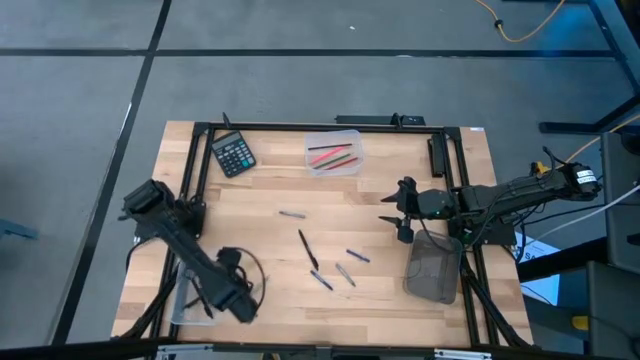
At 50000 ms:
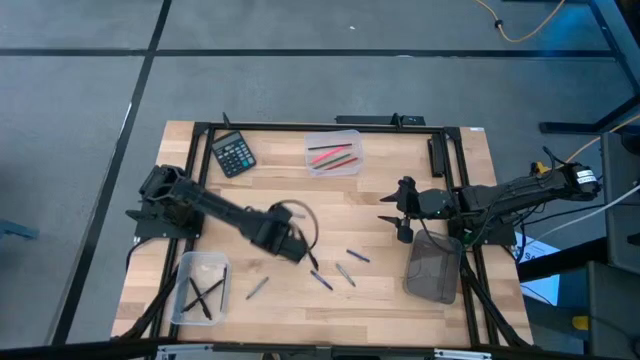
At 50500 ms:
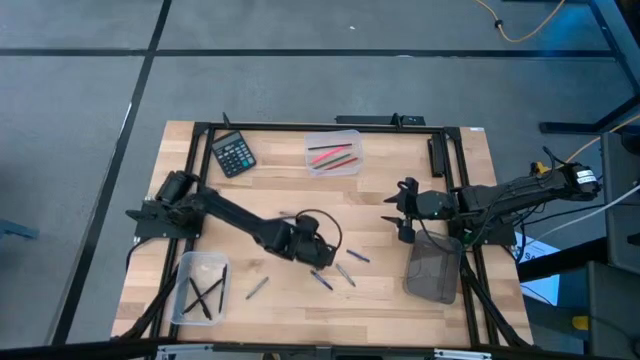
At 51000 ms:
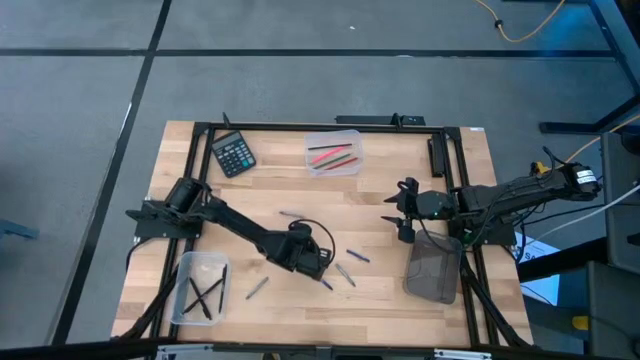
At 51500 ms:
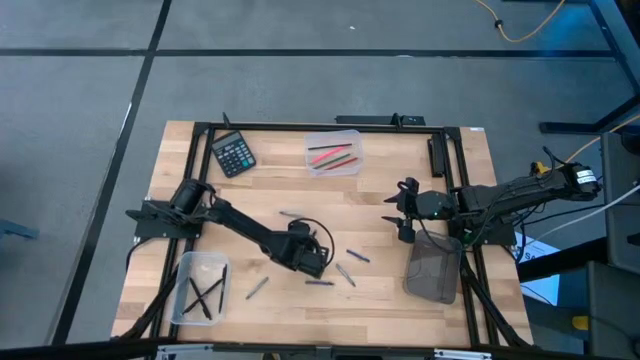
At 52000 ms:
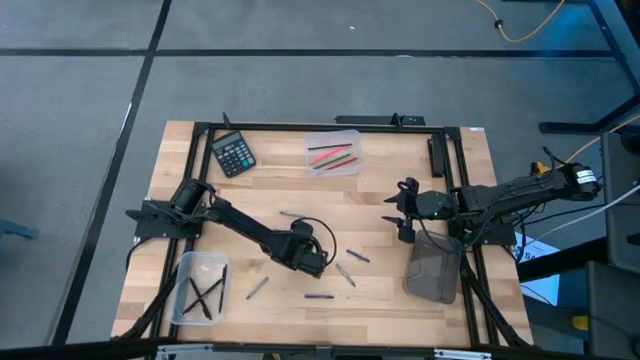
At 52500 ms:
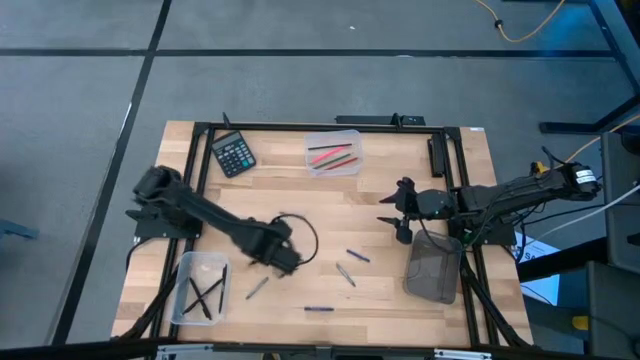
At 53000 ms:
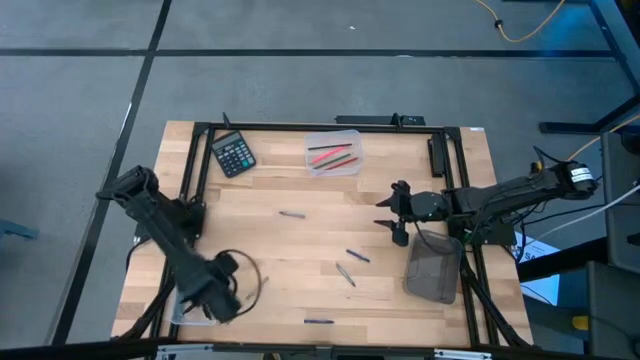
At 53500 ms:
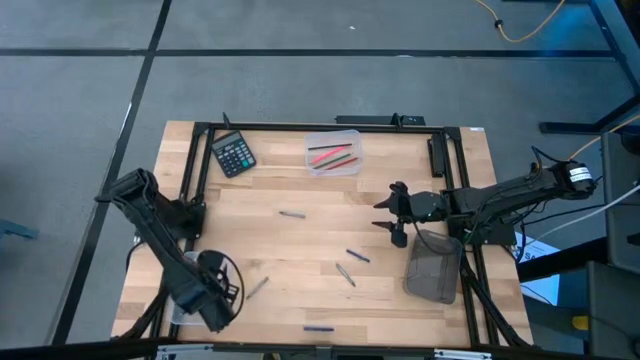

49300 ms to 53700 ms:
Task: Sort crayons/erasers/pens/pencils in bins
Put the black pen into the bottom transparent bin

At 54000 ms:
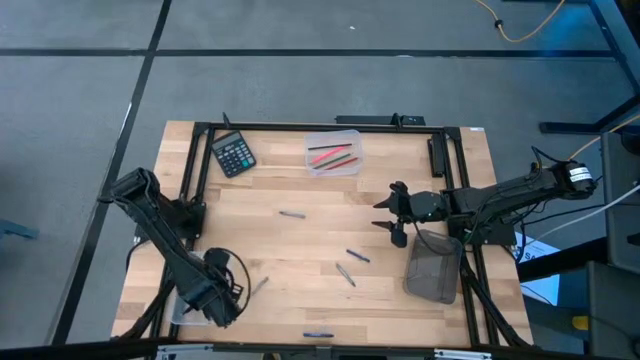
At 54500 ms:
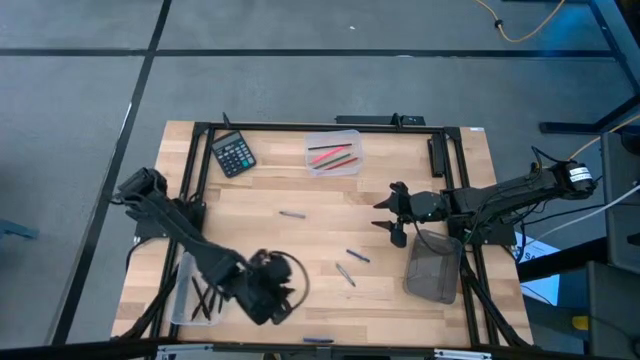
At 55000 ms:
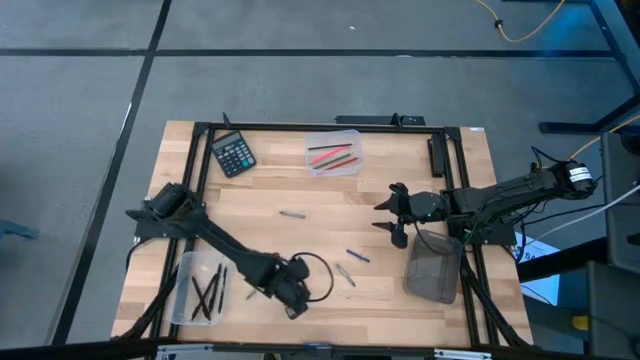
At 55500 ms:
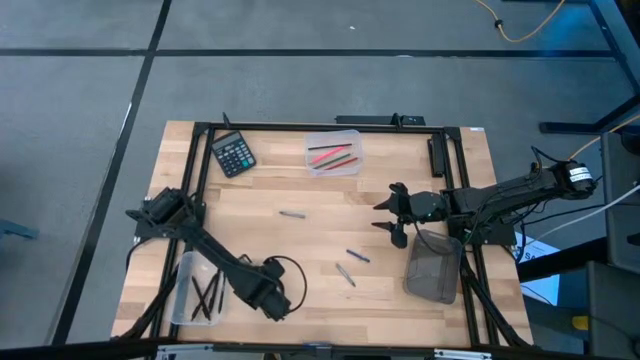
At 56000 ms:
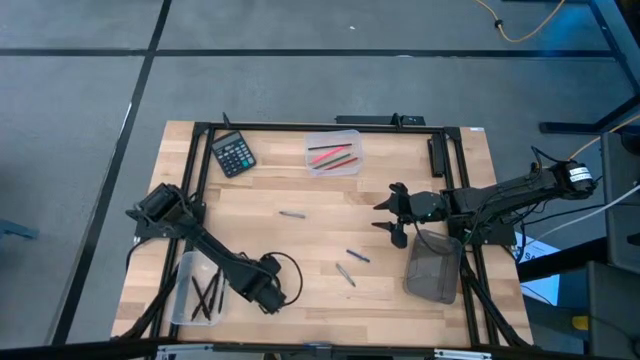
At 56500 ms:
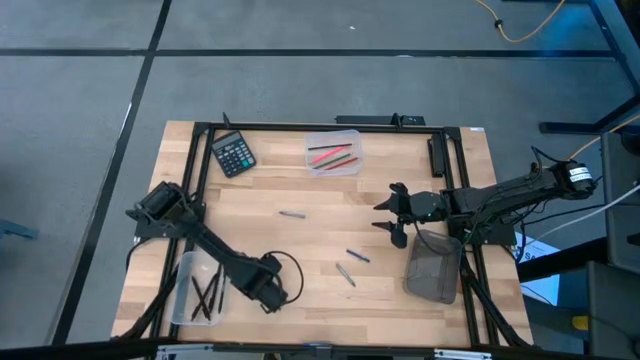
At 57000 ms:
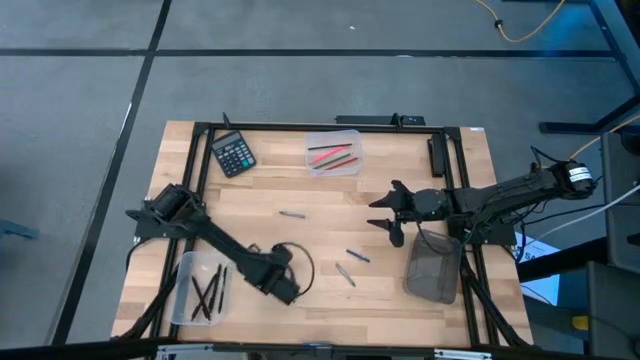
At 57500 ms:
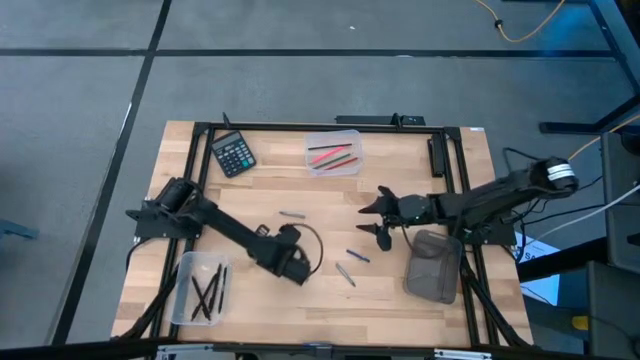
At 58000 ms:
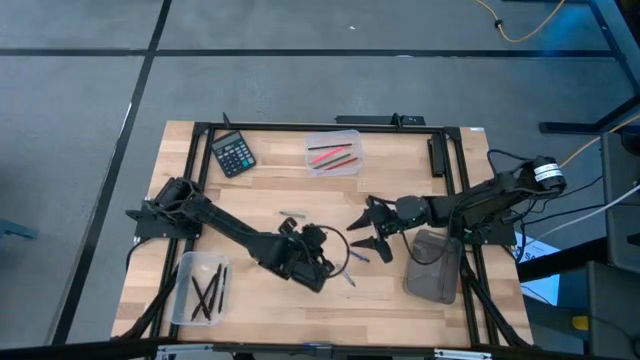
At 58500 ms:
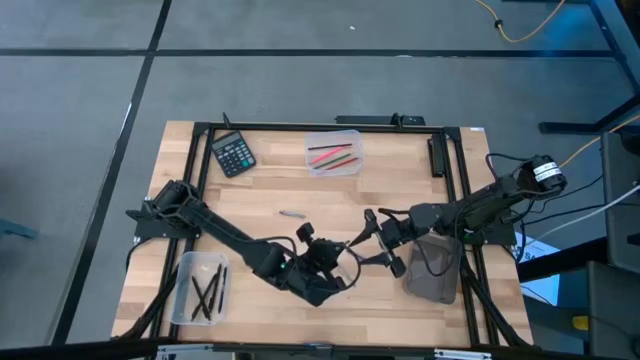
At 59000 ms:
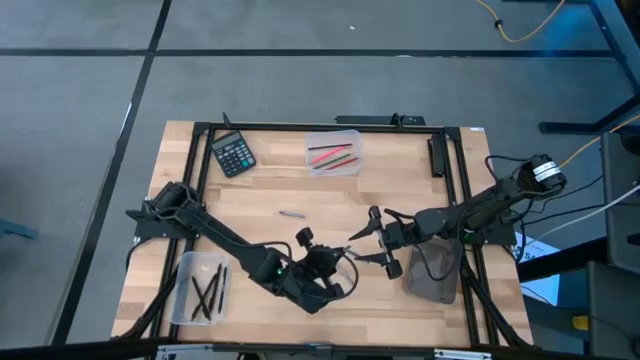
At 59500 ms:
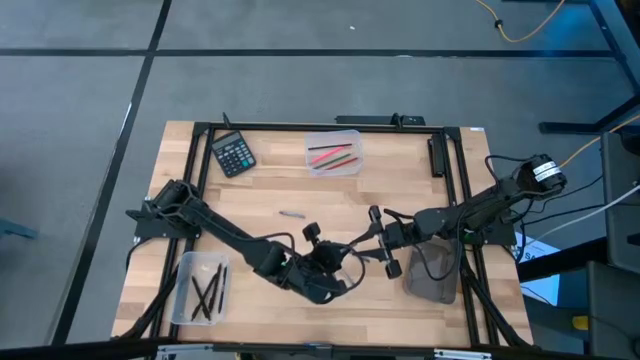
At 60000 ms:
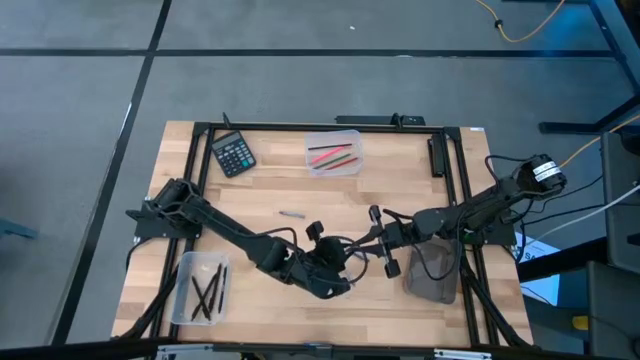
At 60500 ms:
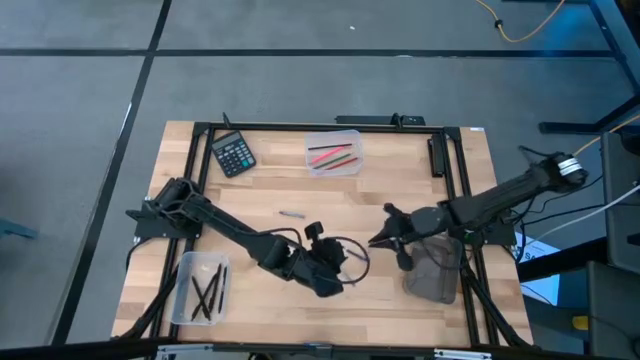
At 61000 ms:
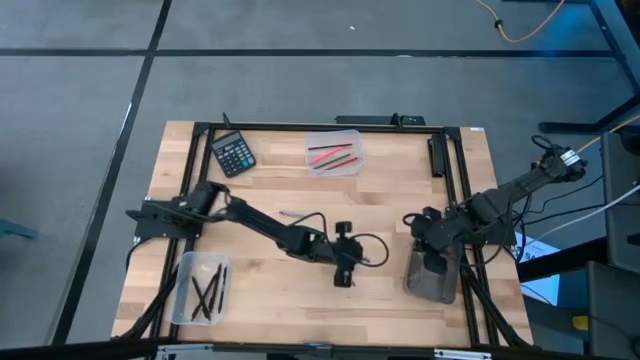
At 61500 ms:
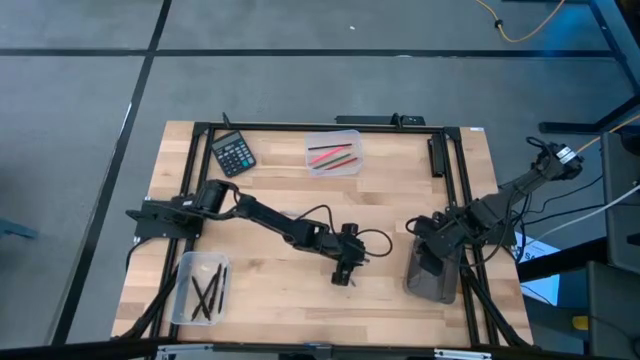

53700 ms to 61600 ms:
Put the gray crayon into the black bin

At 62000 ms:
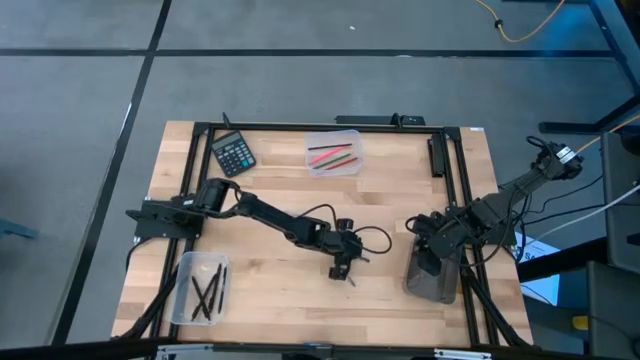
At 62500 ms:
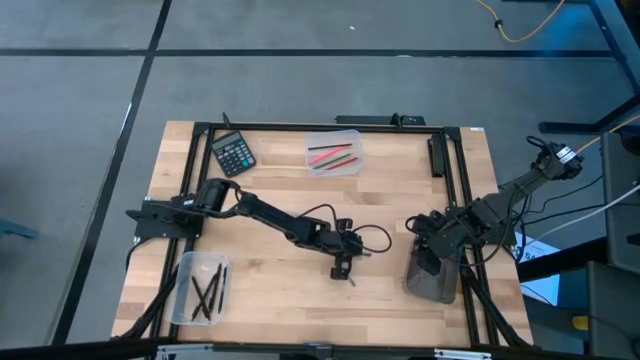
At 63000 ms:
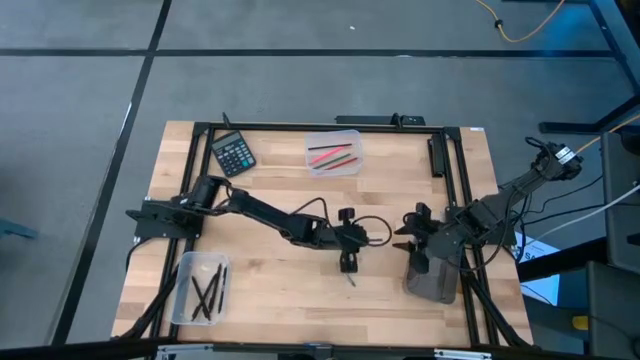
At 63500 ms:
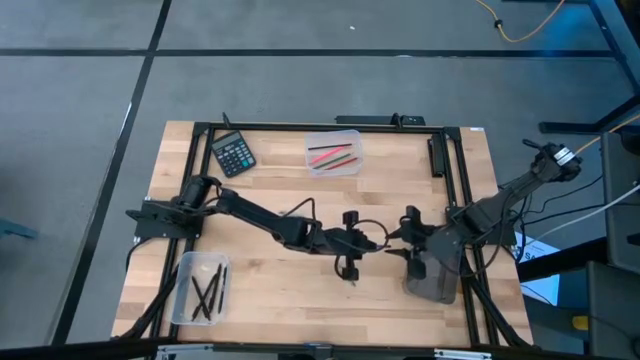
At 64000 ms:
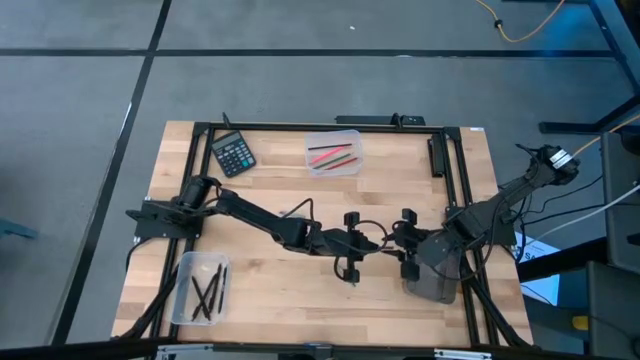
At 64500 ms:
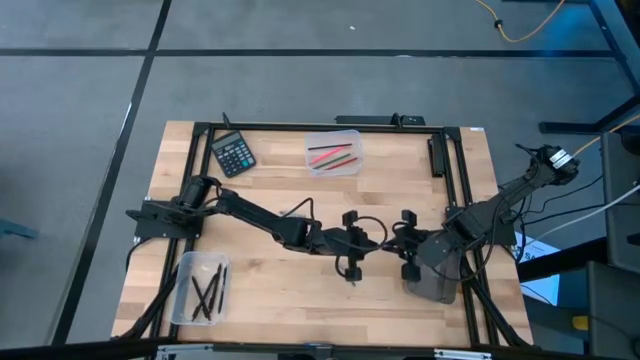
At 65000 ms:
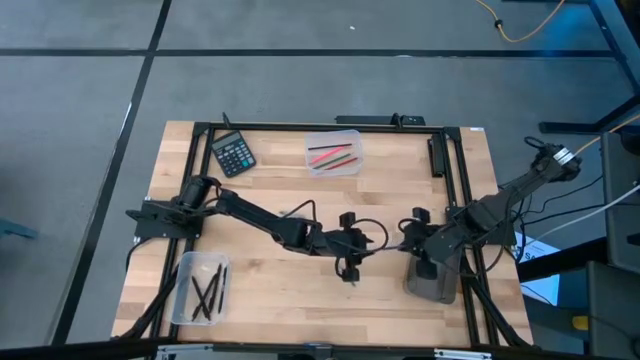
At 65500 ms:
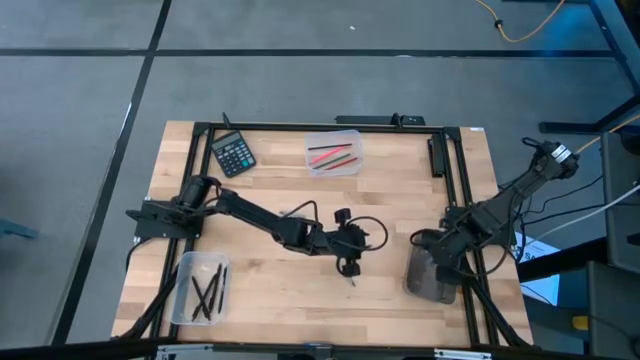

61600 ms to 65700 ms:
Put the blue crayon into the black bin

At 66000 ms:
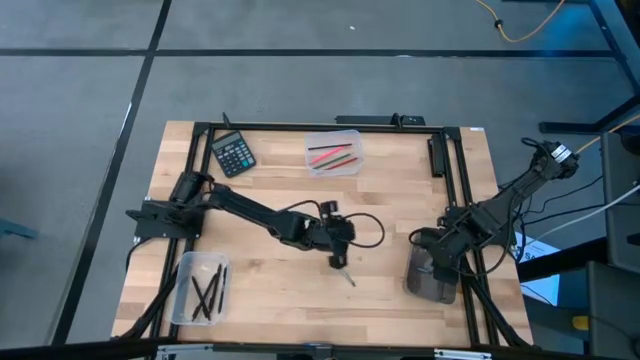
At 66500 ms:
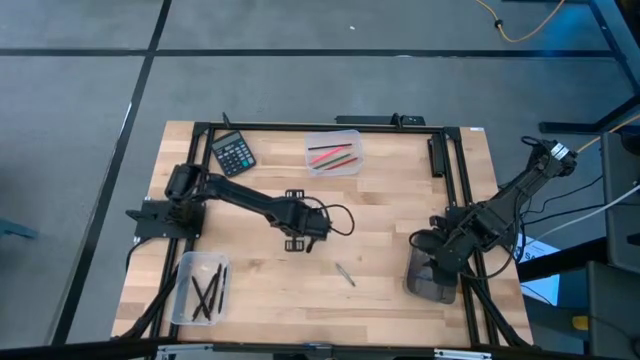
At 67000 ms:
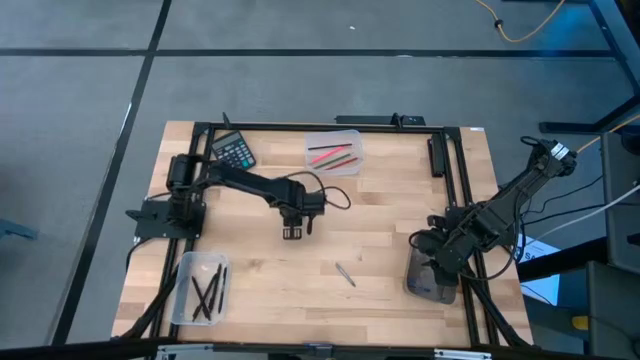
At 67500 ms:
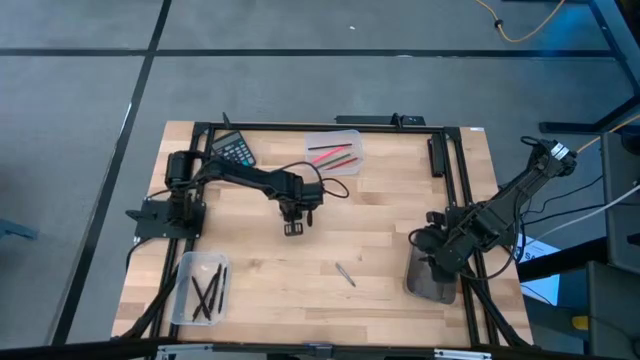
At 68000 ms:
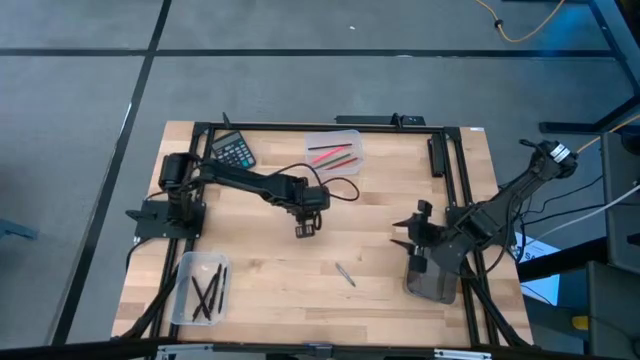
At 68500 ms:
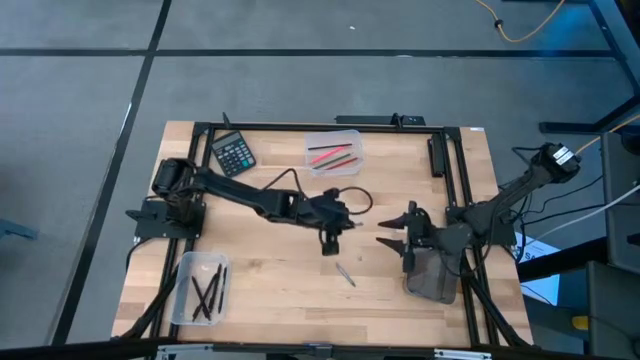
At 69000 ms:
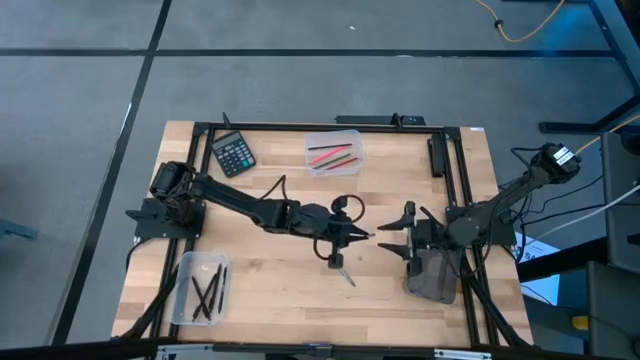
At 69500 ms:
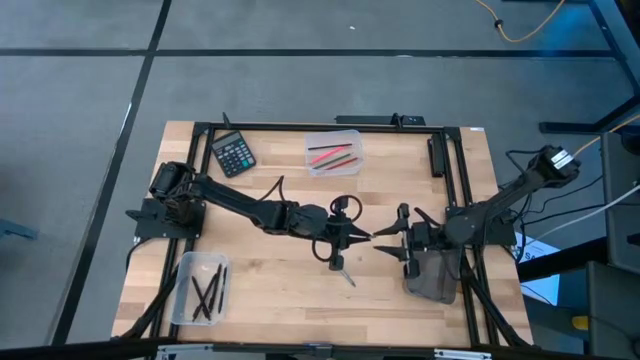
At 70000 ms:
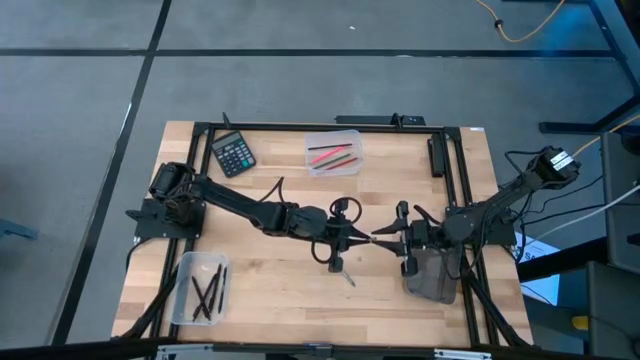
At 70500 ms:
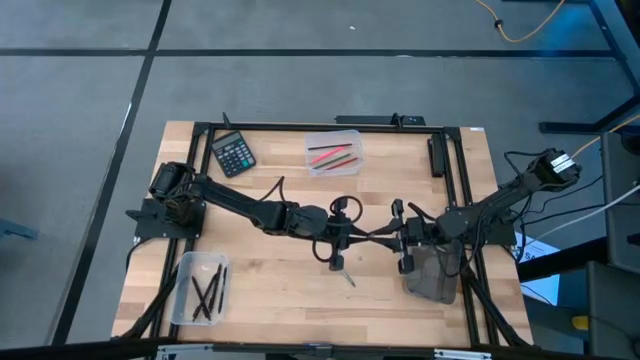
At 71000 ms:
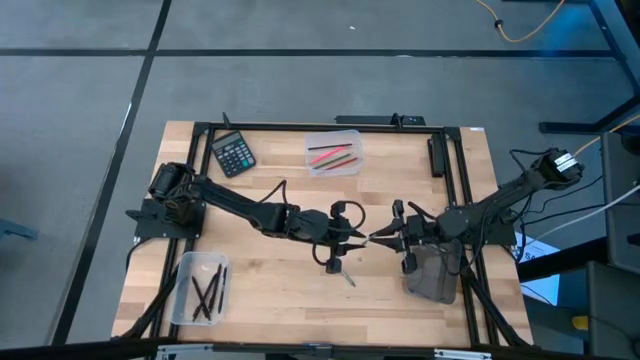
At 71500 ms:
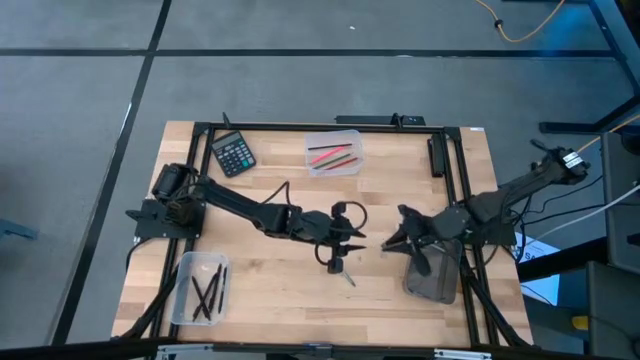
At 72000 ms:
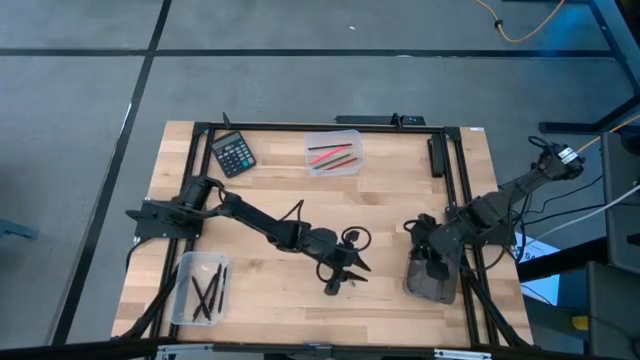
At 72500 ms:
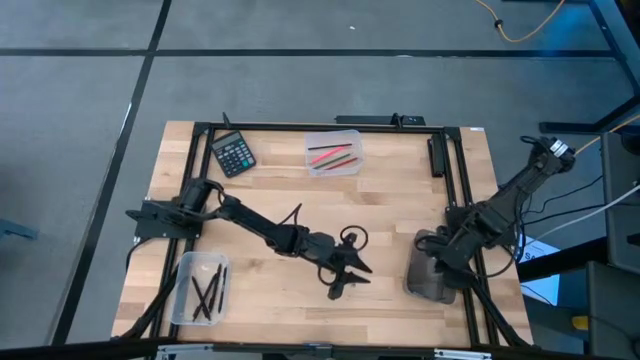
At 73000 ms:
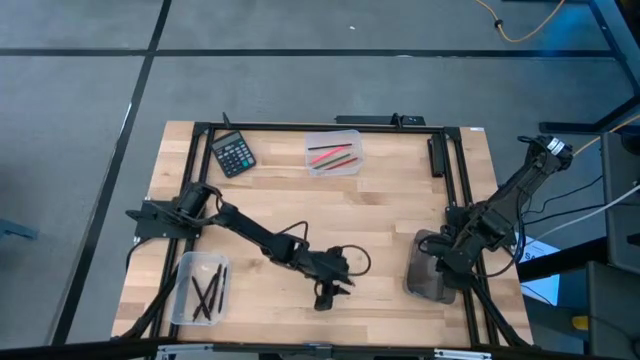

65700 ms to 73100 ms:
Put the gray crayon into the black bin
